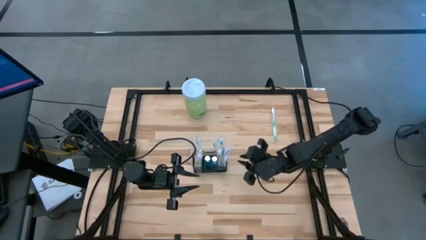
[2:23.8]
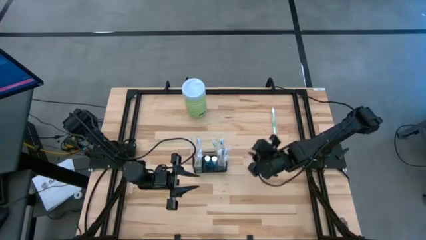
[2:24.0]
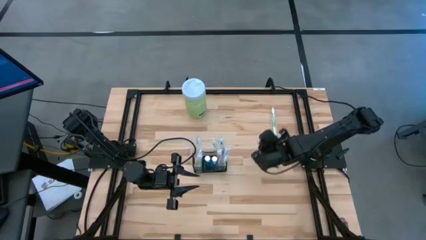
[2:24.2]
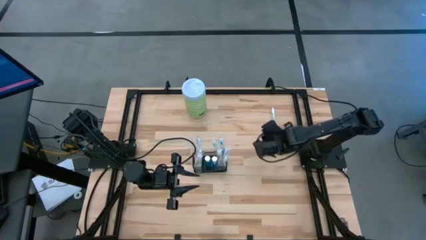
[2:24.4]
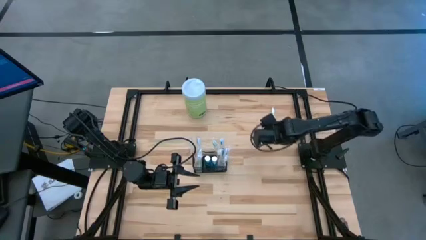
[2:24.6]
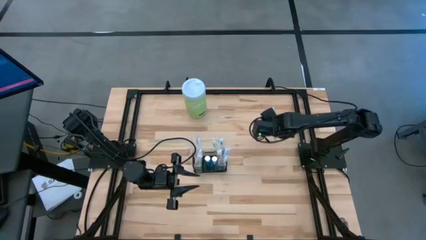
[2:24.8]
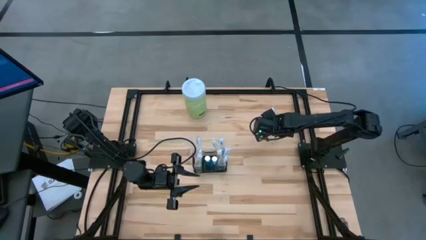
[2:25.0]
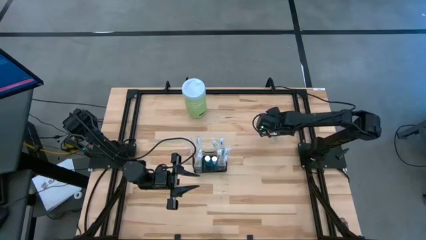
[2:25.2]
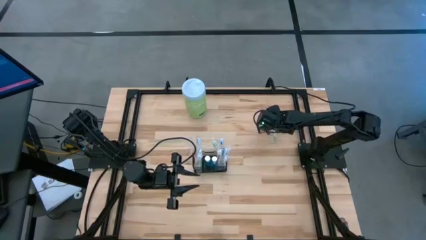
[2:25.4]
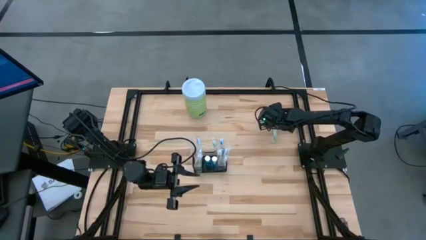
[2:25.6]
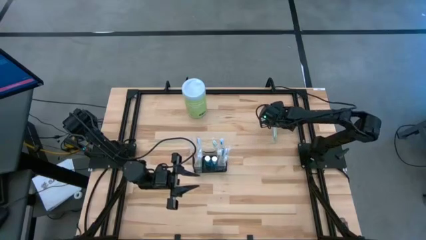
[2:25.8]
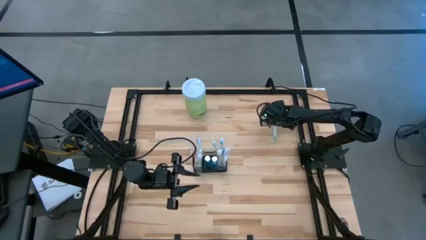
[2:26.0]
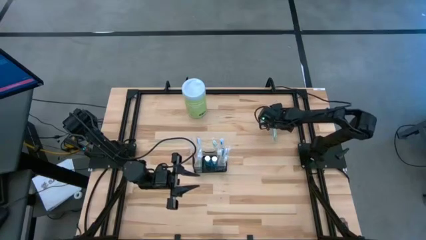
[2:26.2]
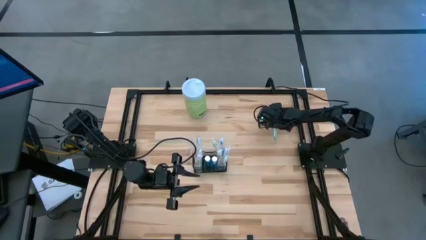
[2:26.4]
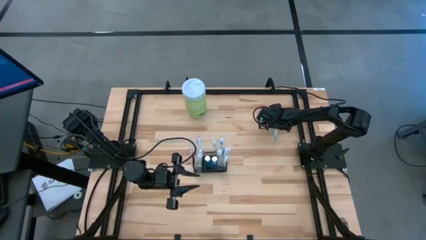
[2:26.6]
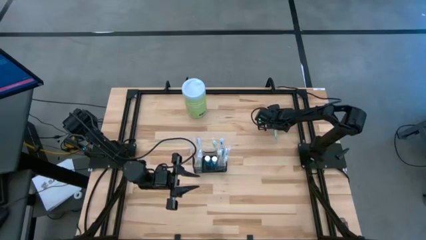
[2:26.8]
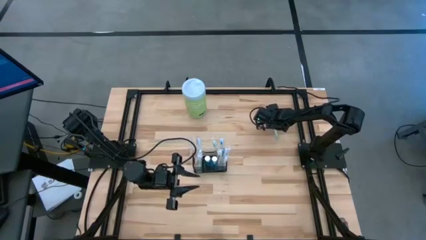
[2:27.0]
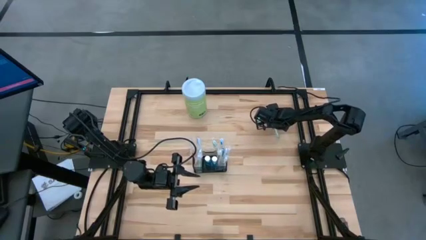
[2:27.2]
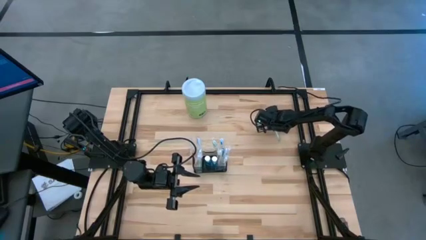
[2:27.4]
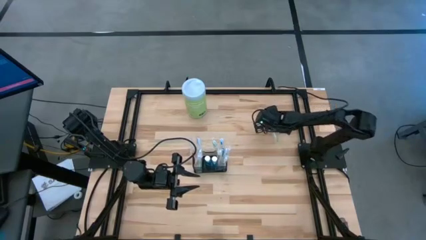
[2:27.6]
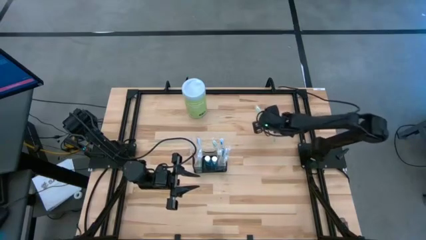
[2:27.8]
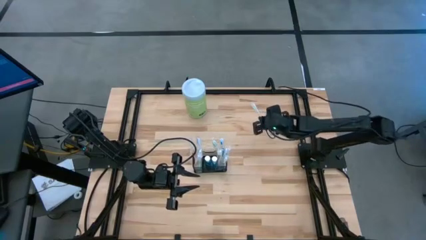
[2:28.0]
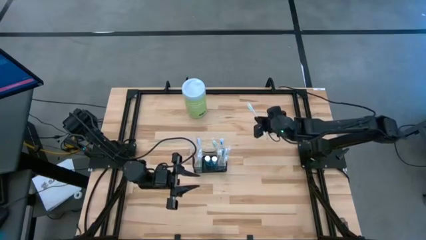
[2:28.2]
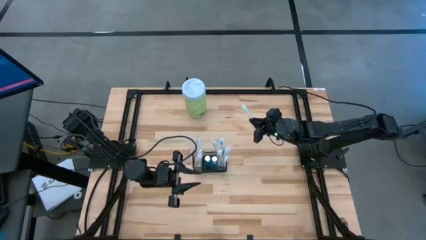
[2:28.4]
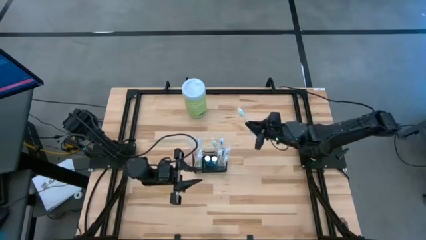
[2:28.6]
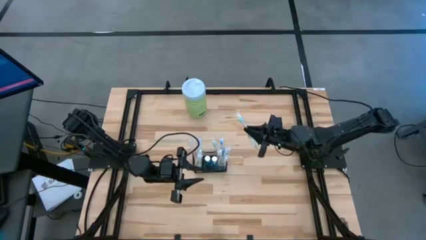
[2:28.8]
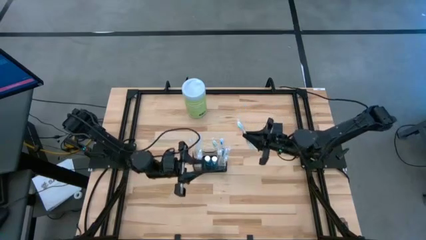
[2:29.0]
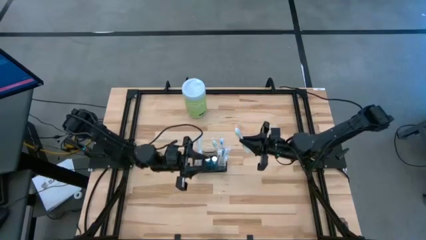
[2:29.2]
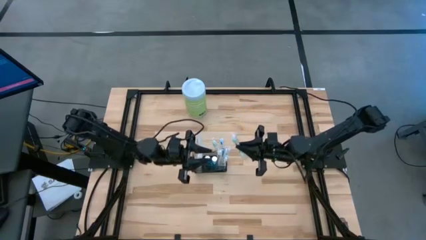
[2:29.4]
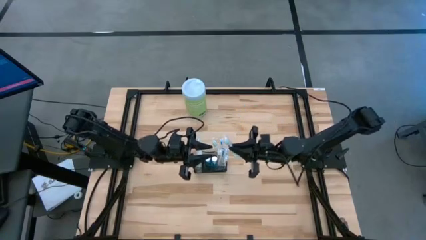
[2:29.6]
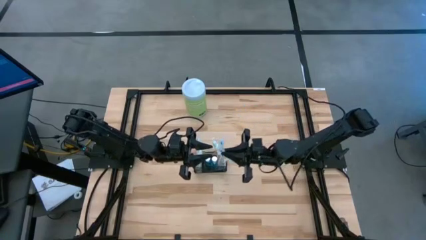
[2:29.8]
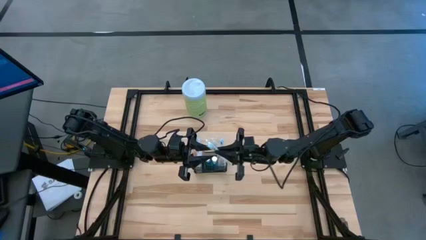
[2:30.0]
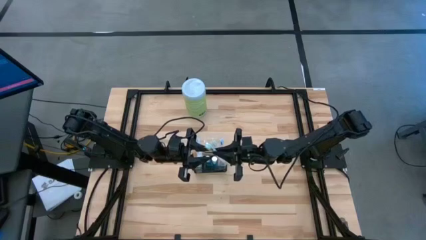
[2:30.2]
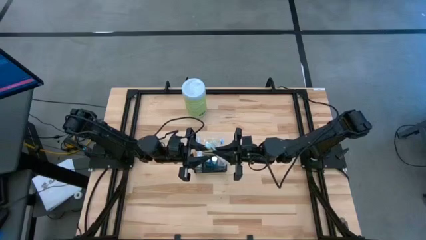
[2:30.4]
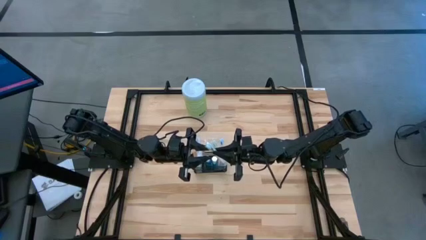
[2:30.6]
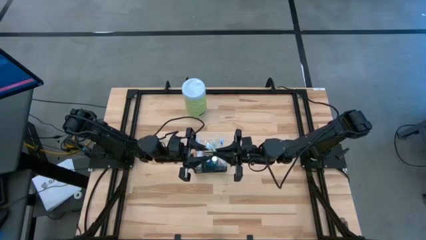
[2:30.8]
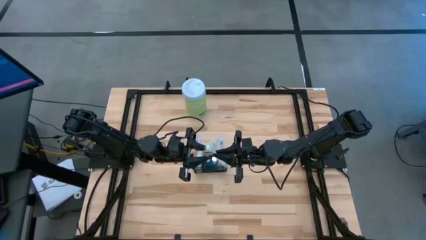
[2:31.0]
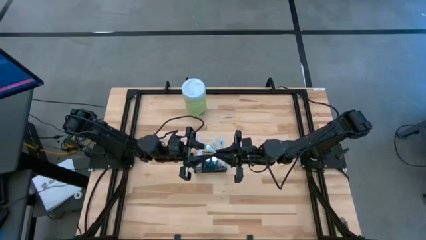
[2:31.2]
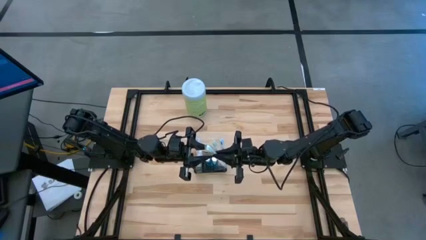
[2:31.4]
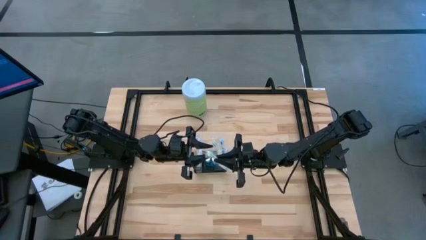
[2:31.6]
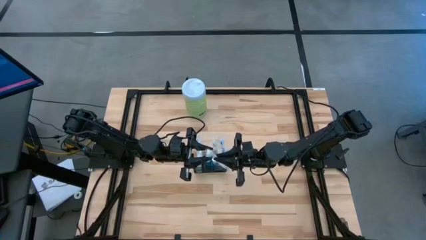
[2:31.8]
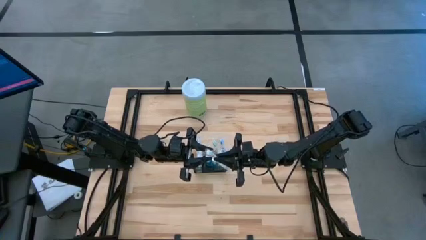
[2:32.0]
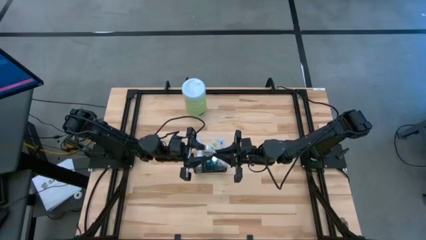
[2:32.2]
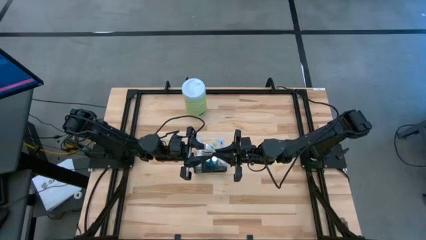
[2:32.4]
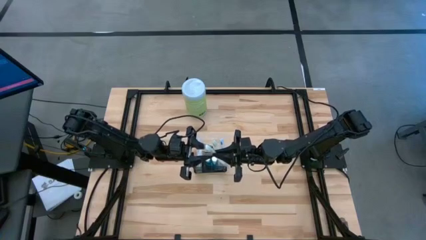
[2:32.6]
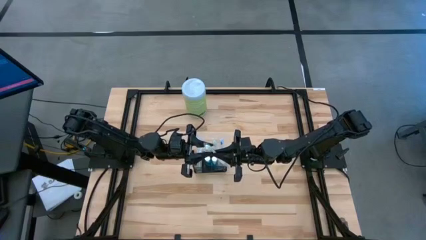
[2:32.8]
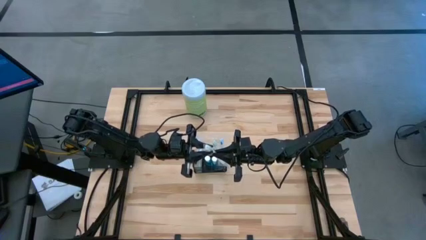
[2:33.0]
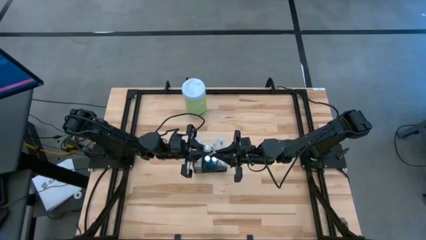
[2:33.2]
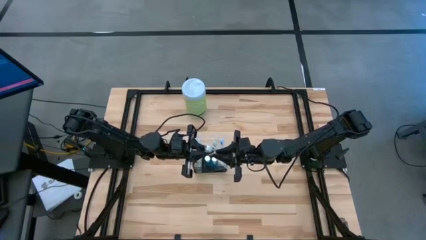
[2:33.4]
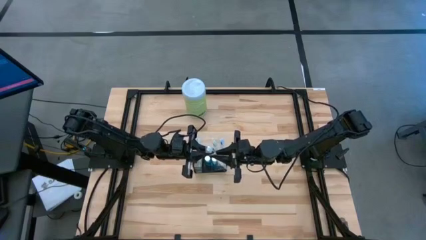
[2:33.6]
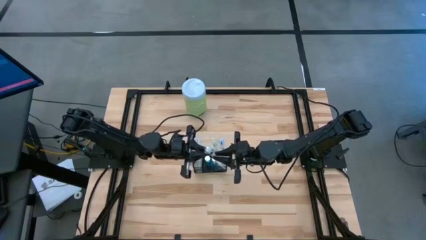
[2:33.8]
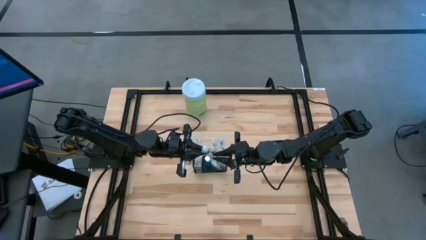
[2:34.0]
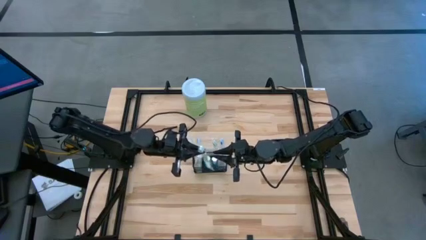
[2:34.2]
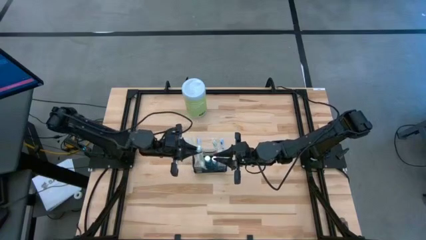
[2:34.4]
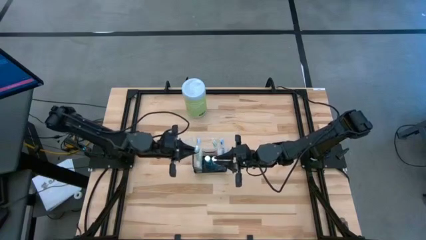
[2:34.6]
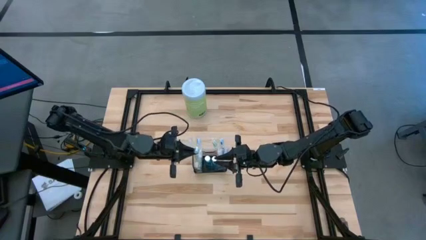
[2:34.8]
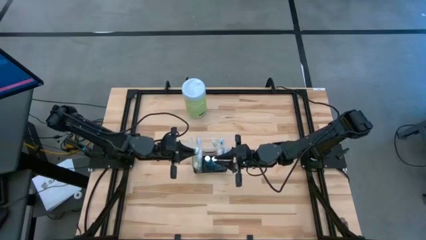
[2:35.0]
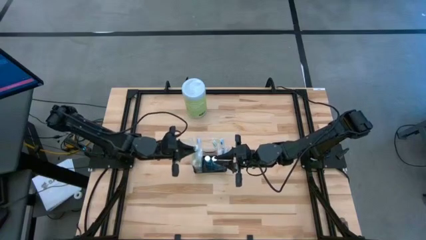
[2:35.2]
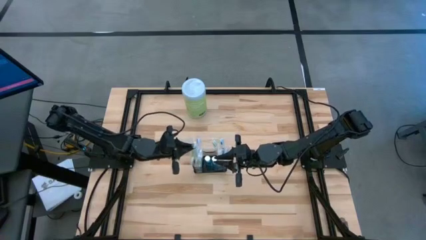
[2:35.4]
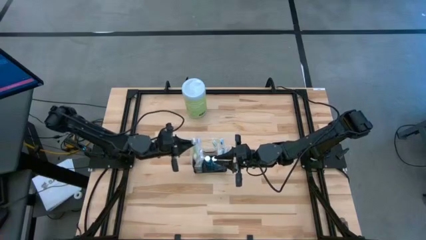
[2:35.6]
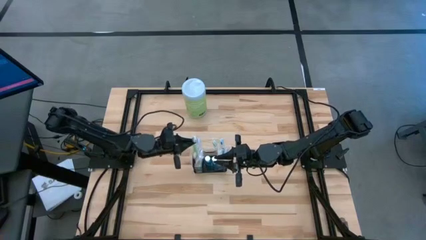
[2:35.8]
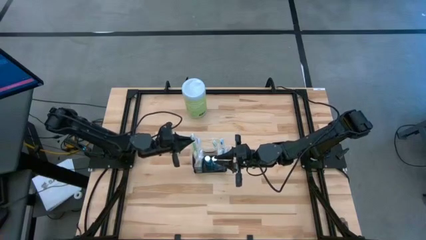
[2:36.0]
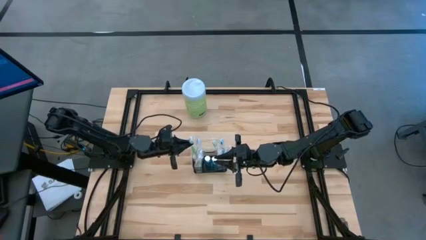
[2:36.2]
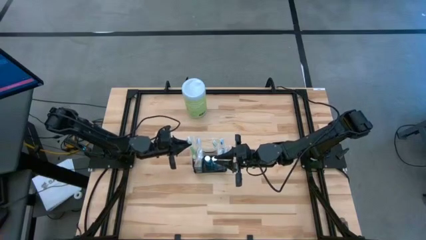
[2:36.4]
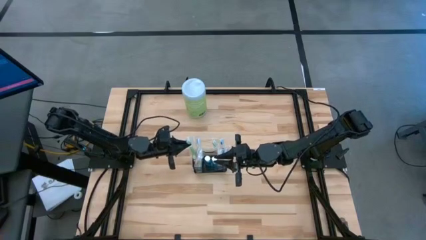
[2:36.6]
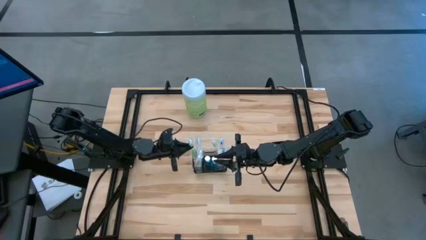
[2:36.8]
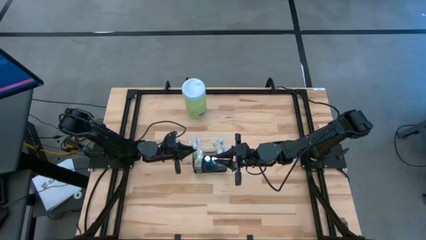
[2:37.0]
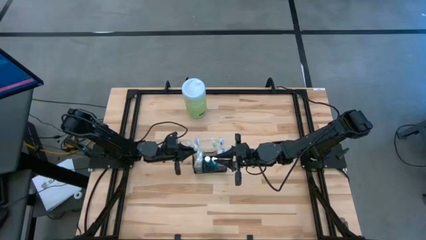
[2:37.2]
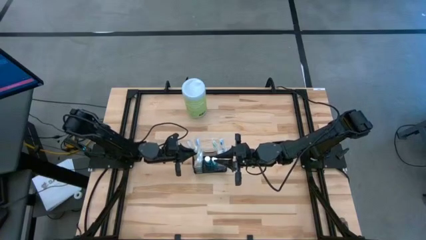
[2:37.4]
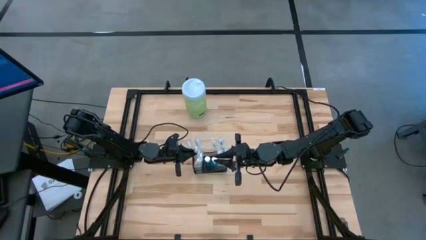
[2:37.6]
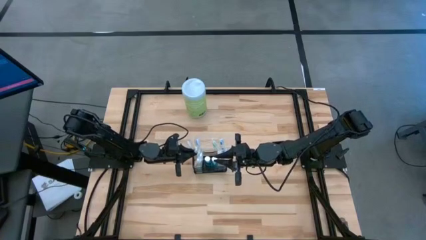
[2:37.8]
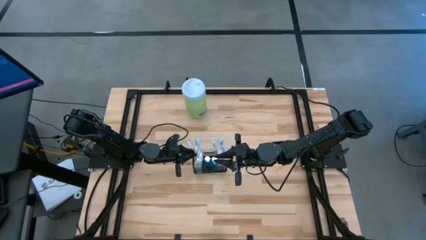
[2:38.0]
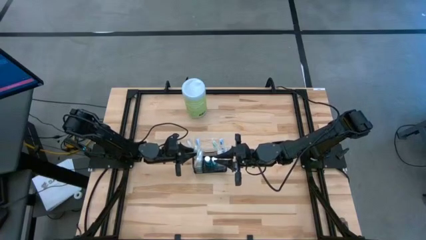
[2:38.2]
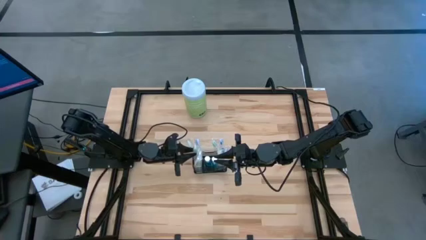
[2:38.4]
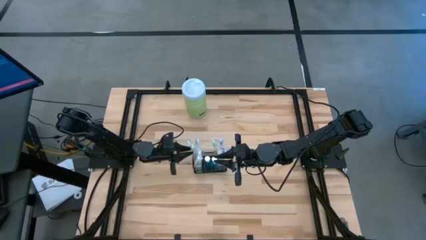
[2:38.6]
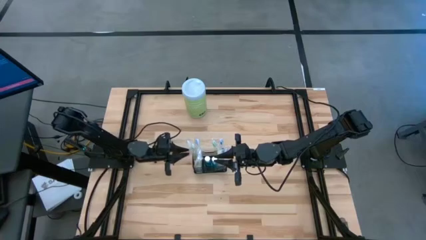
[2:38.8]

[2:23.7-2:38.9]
Task: Pick & Place toothbrushing station
Put the green toothbrush into the wire organizer
